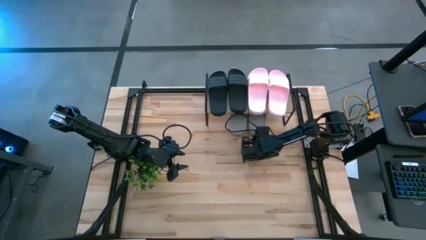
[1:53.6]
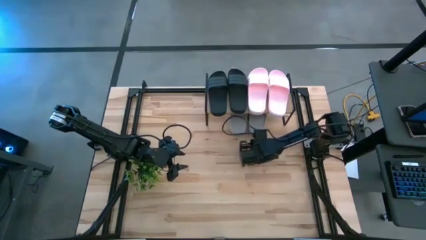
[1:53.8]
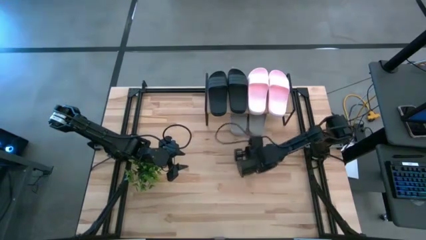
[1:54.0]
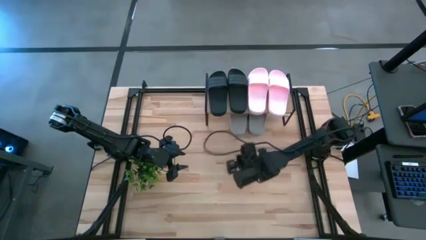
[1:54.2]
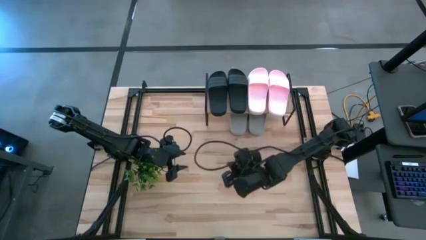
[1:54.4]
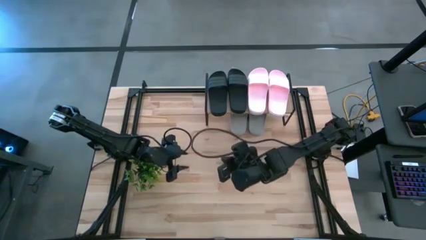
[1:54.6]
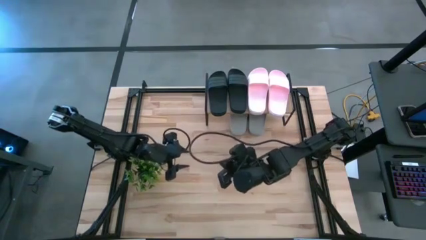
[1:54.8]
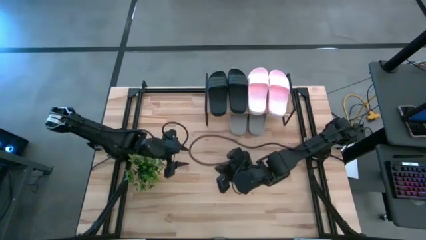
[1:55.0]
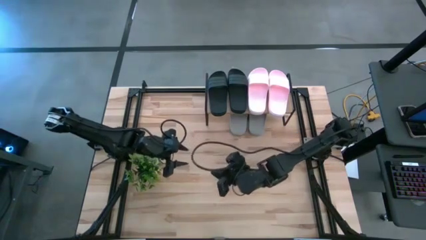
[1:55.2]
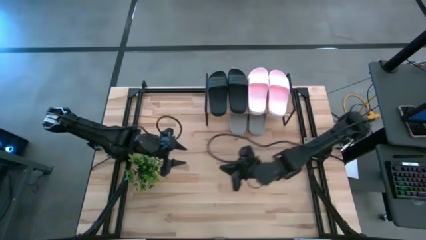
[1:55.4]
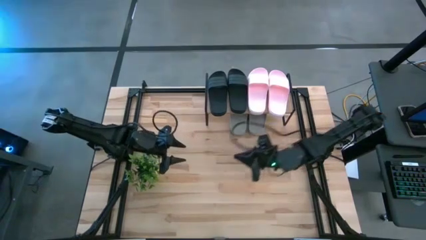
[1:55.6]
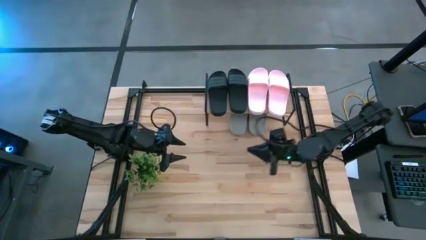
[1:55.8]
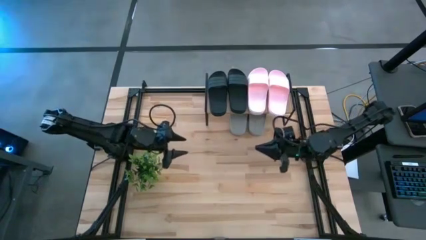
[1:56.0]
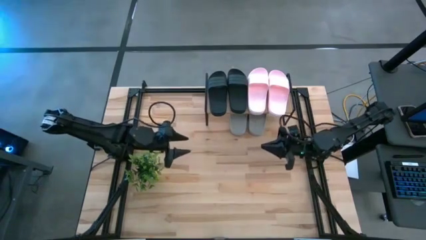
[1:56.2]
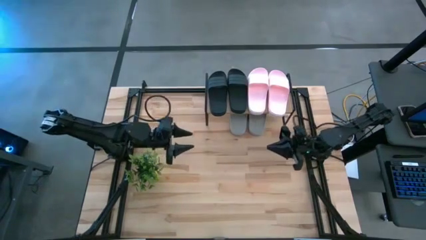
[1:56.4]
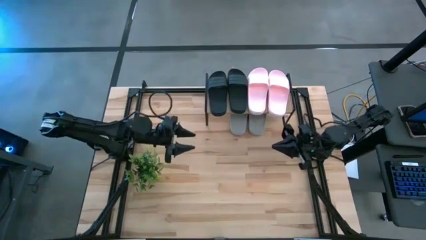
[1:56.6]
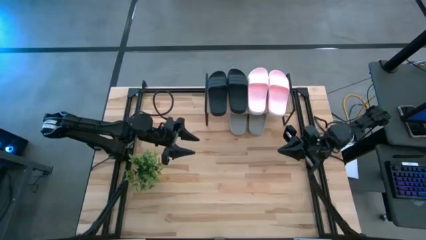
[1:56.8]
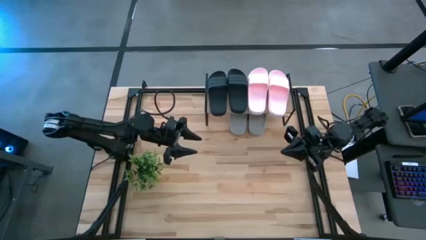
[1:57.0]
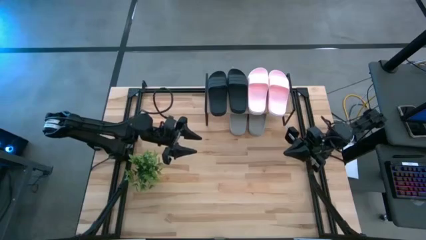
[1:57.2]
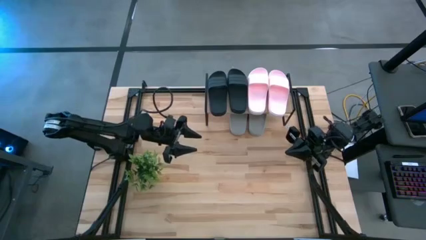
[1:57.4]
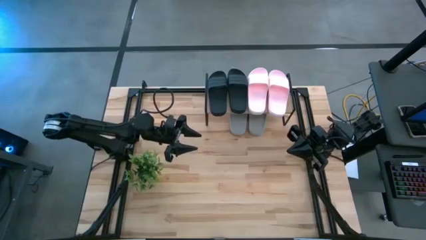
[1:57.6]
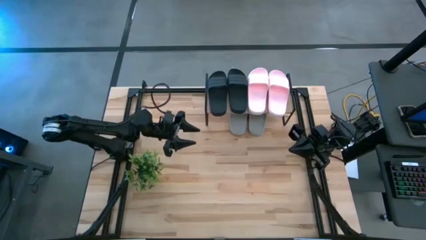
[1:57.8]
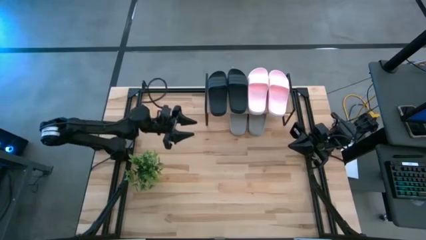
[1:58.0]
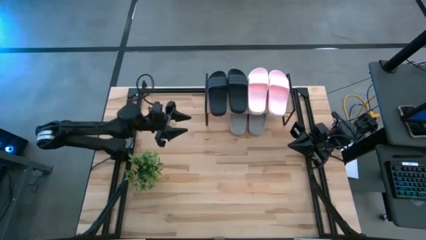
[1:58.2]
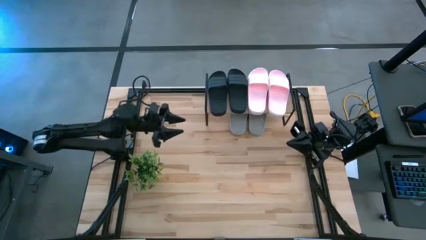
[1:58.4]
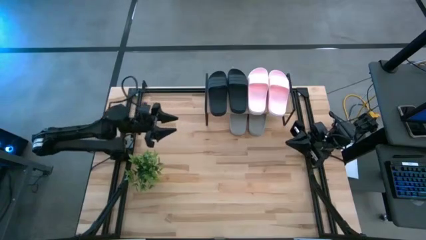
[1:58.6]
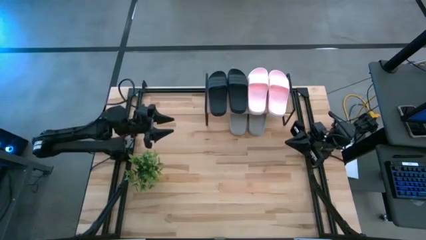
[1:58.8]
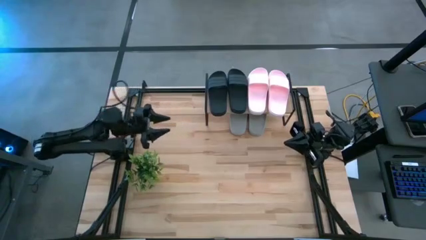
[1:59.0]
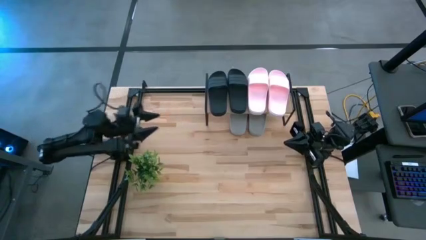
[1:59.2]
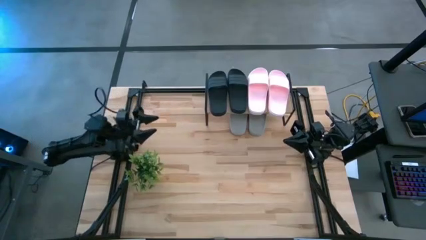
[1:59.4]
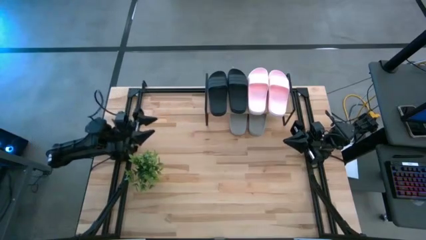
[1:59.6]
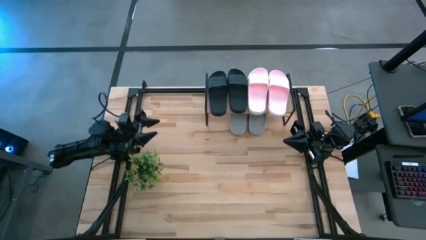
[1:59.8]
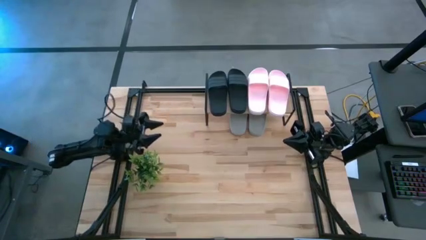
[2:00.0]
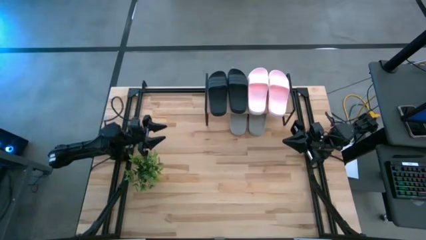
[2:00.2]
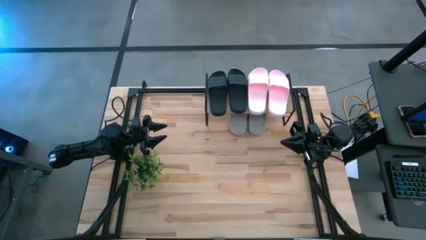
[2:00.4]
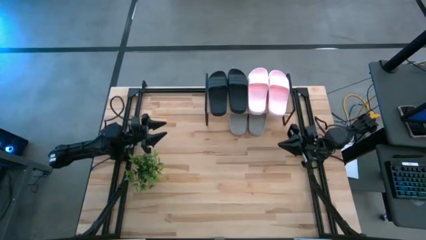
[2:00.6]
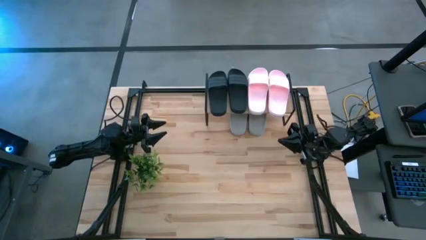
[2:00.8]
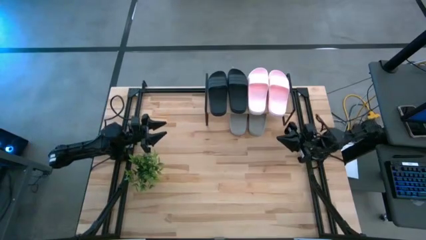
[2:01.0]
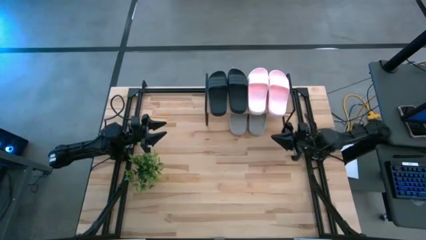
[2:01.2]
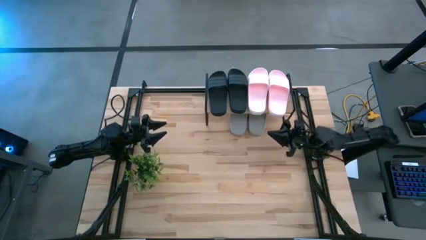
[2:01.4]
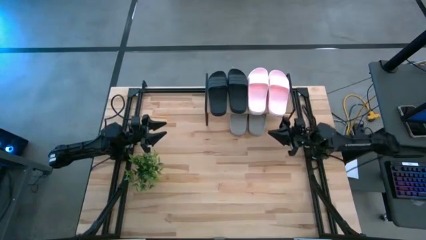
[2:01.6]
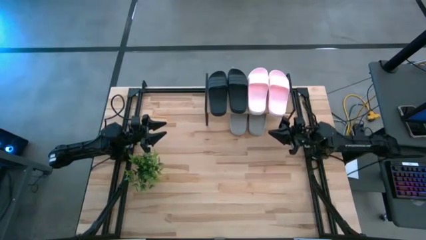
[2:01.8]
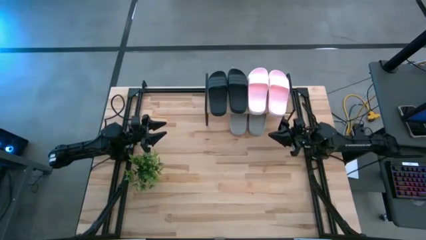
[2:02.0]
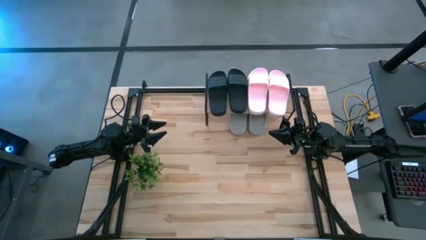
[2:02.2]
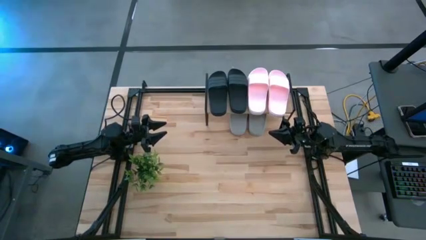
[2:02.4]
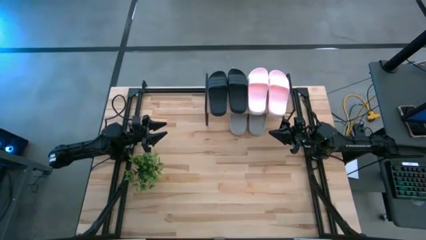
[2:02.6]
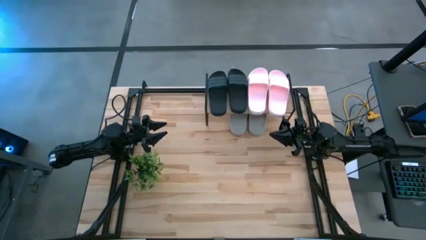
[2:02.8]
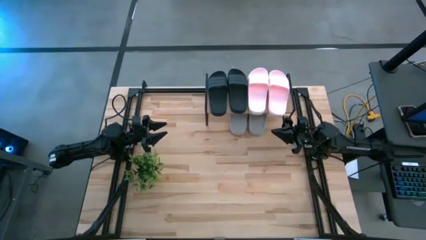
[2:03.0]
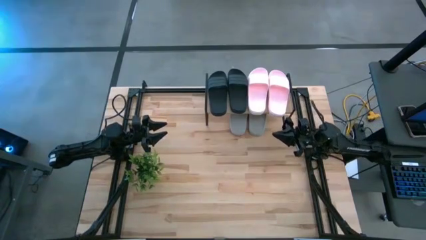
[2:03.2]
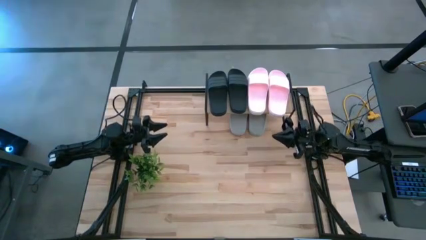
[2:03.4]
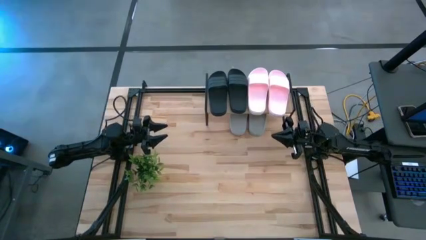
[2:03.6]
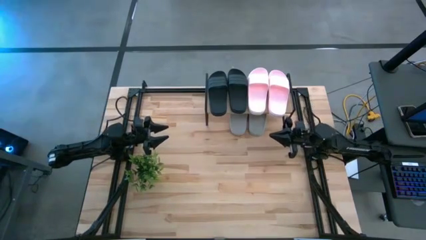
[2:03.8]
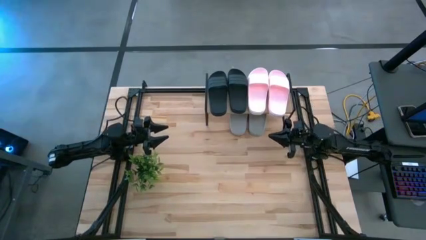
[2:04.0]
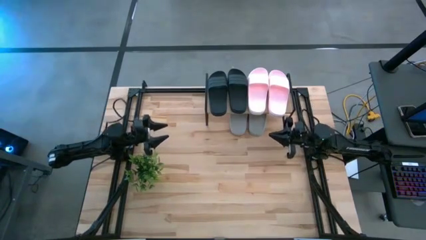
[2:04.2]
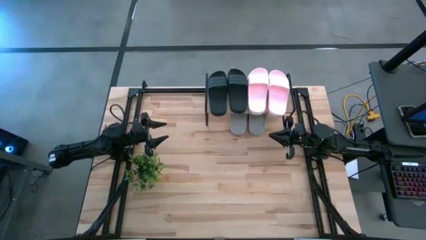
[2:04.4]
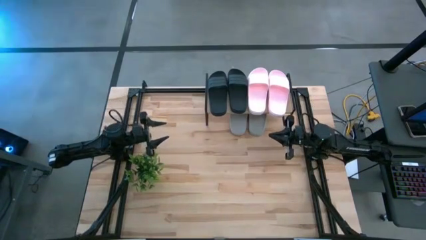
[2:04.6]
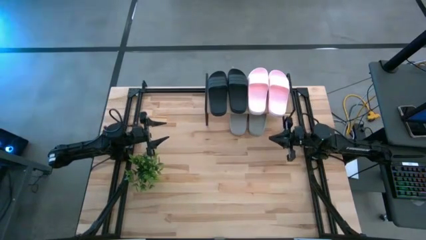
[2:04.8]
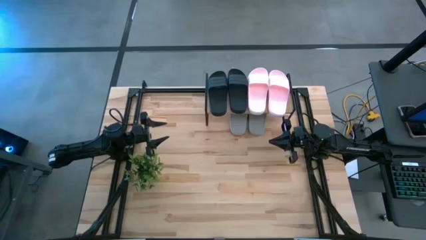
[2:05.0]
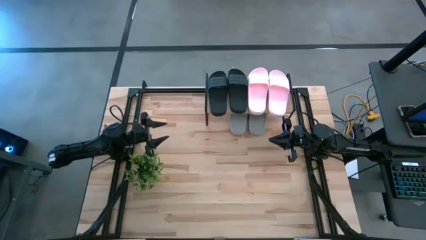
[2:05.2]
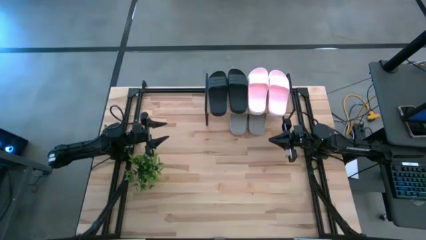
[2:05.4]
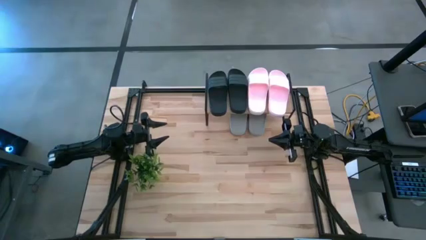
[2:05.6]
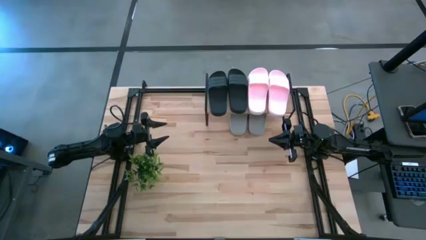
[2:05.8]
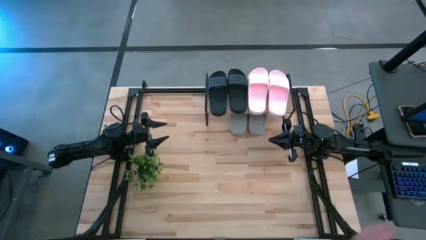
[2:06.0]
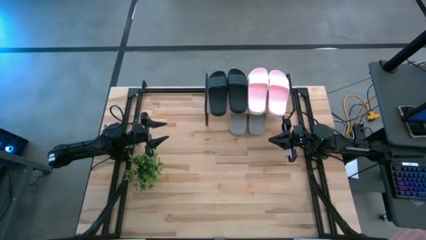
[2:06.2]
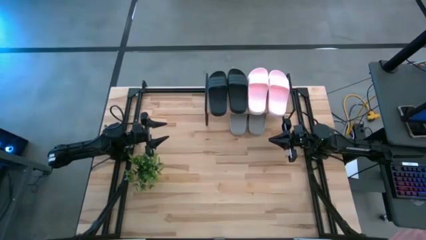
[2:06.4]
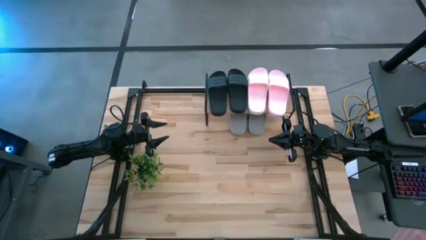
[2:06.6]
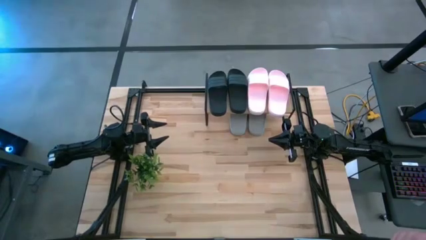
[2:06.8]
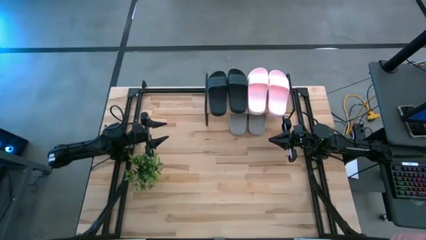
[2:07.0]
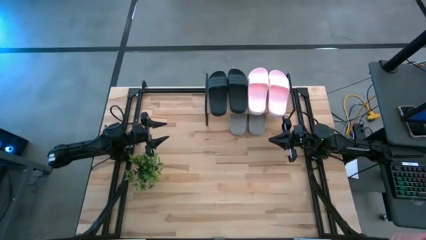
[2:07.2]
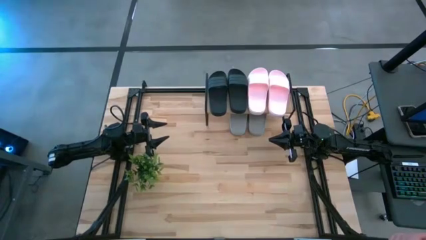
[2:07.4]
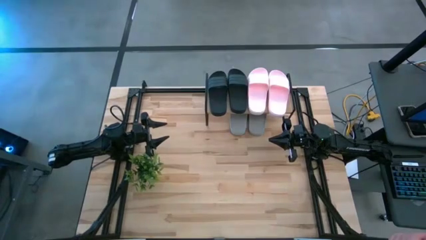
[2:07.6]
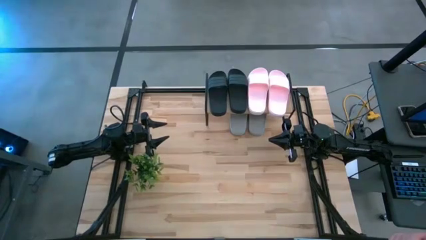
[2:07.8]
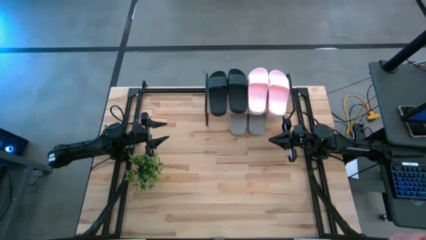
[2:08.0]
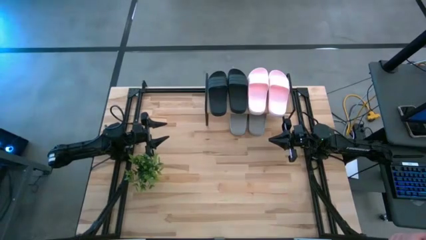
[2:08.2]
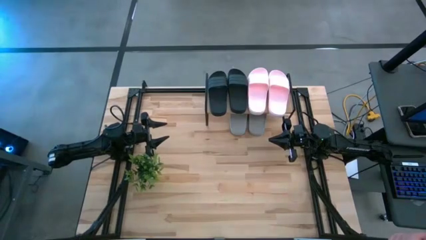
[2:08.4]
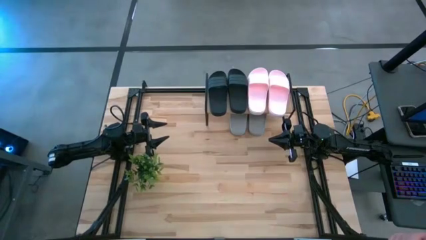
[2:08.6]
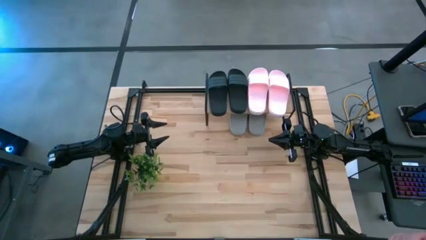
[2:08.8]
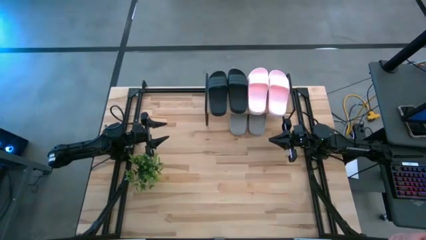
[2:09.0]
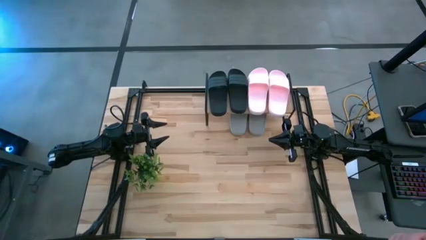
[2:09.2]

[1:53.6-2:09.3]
Task: Pick and place slides into the shelf
Return to Home Position
